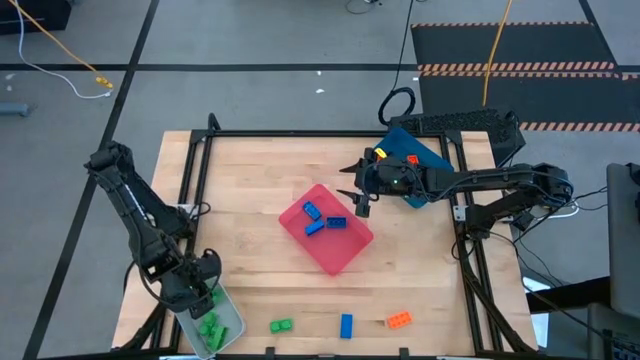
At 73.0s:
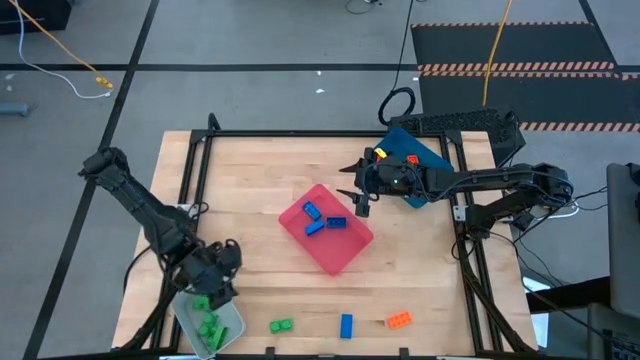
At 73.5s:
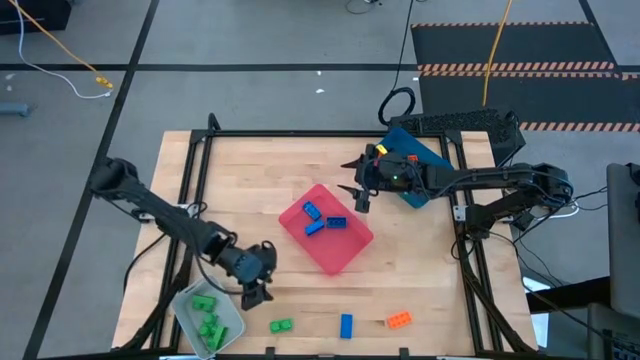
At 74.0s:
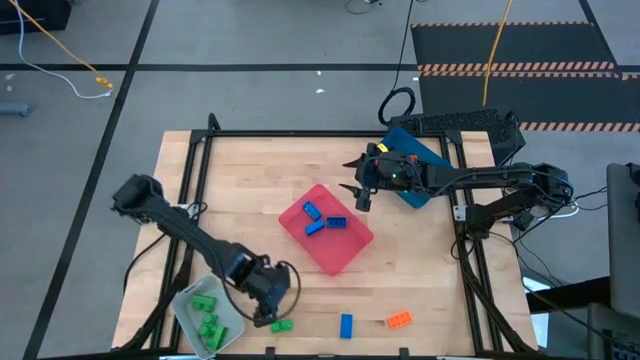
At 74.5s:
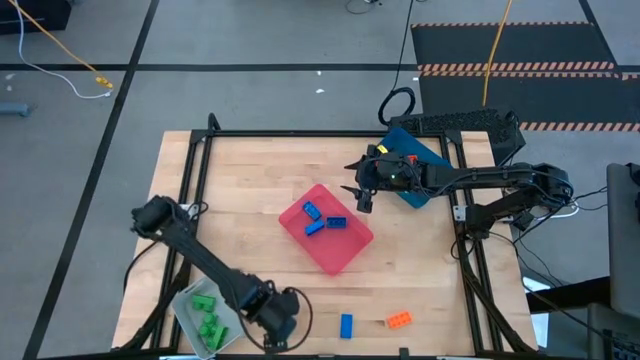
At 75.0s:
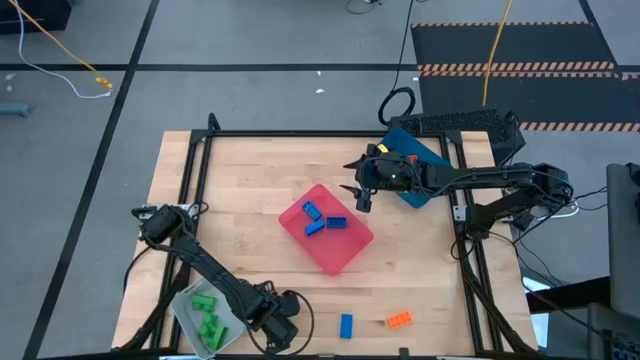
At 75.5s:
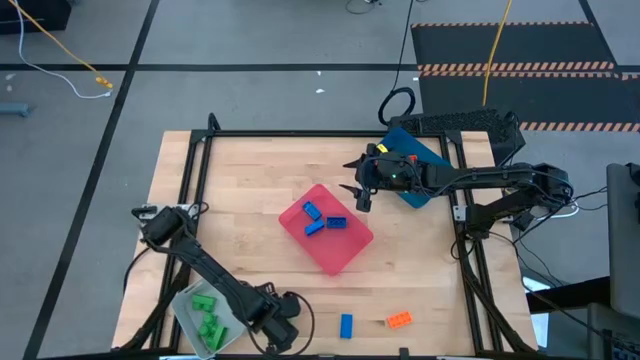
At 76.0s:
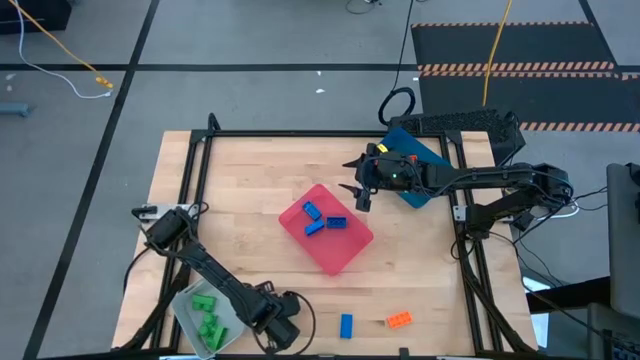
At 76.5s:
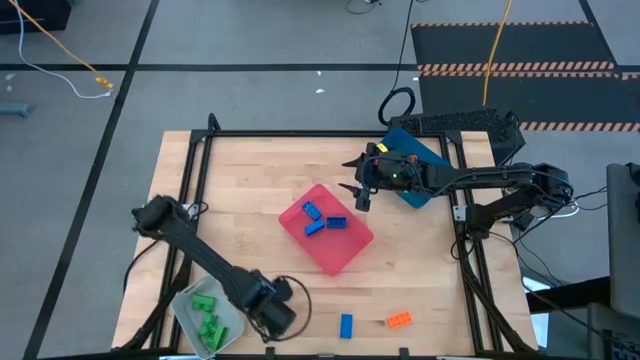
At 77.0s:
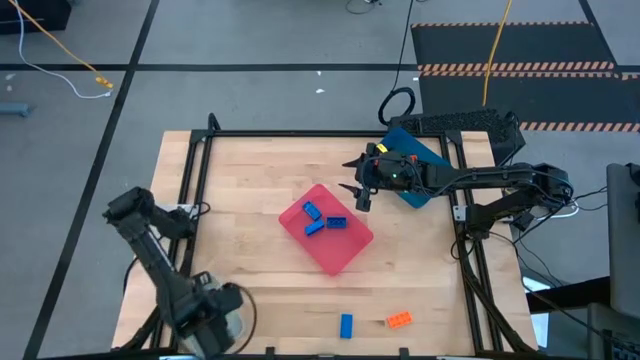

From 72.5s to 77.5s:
Task: Sort & place blocks by color
Put the green game piece into the gray bin

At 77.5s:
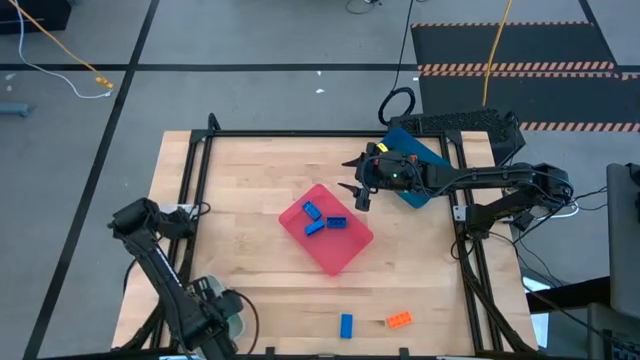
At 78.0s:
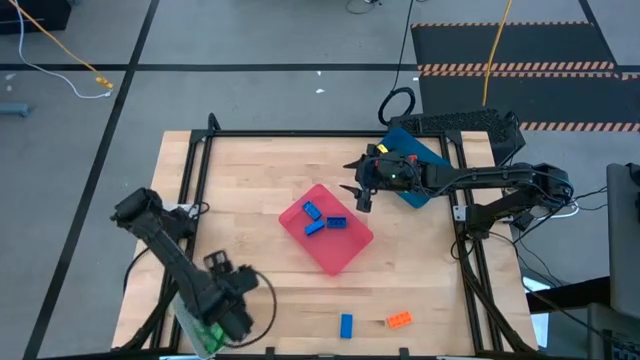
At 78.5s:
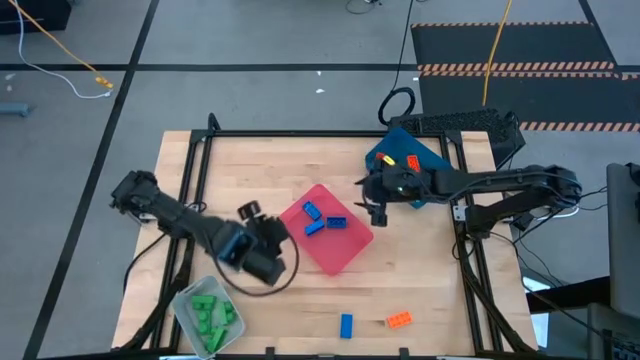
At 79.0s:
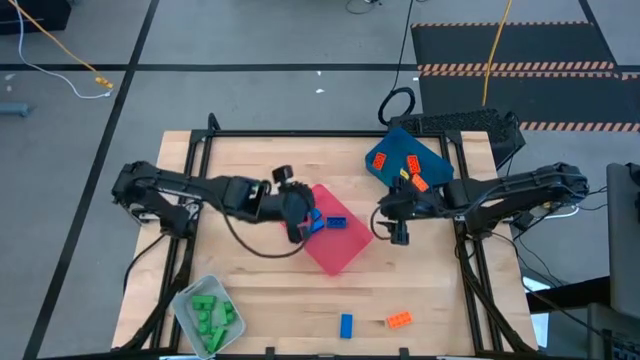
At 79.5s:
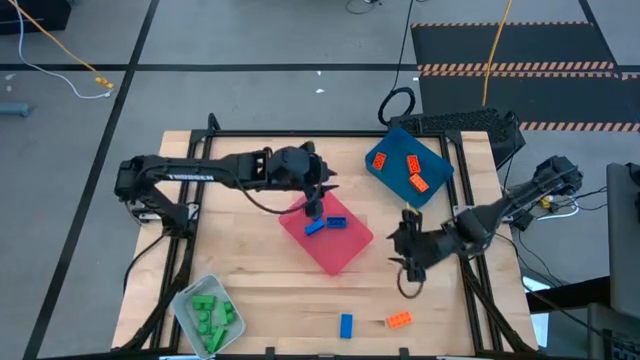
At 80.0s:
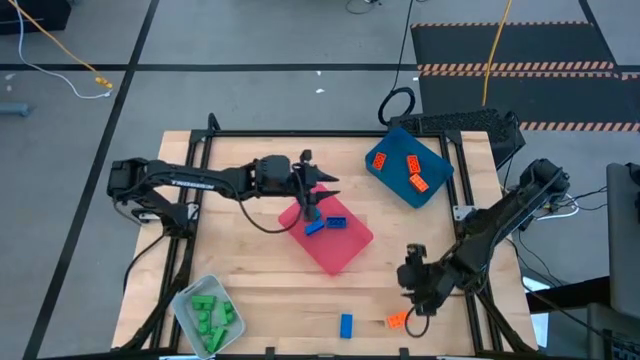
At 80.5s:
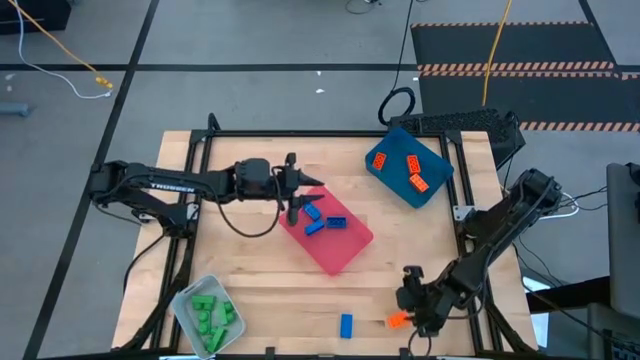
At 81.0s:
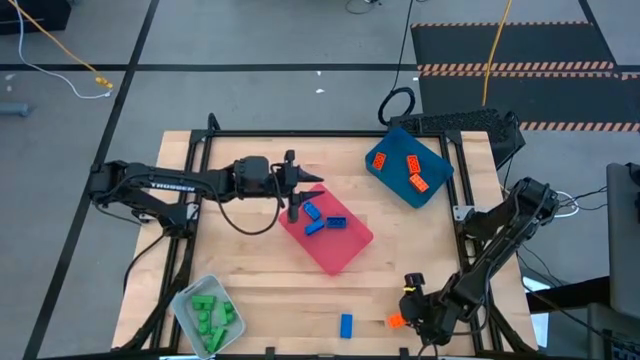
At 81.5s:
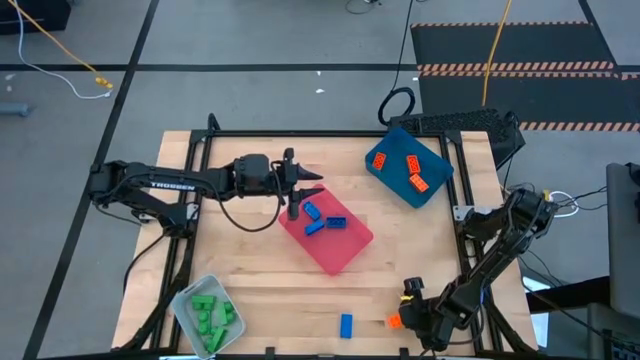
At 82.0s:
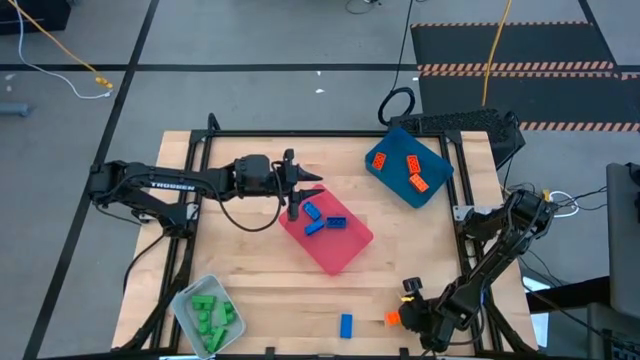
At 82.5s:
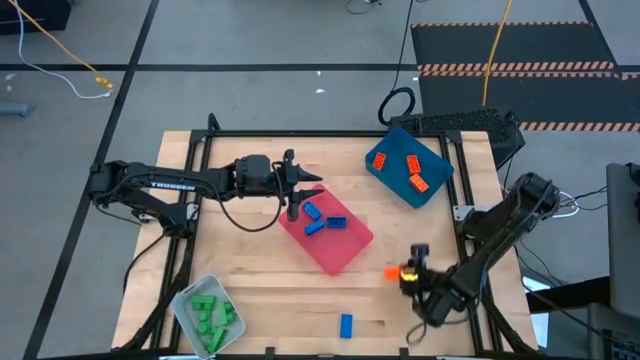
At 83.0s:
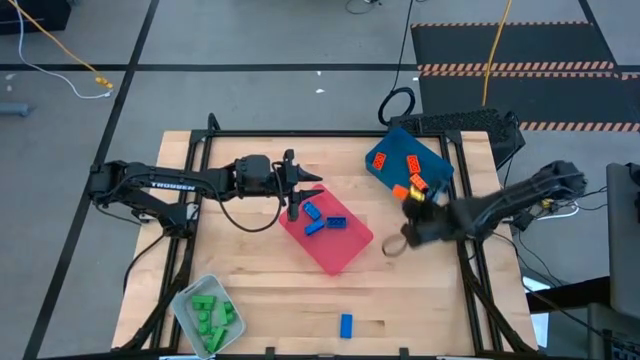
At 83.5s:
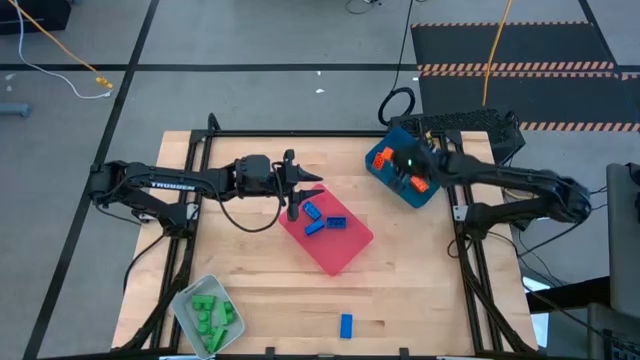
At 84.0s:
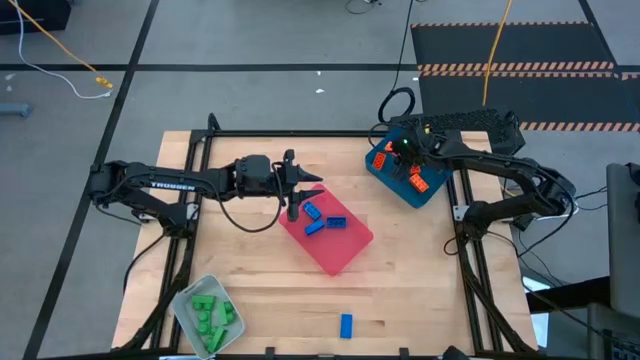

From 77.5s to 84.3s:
Put the orange game piece into the blue bin

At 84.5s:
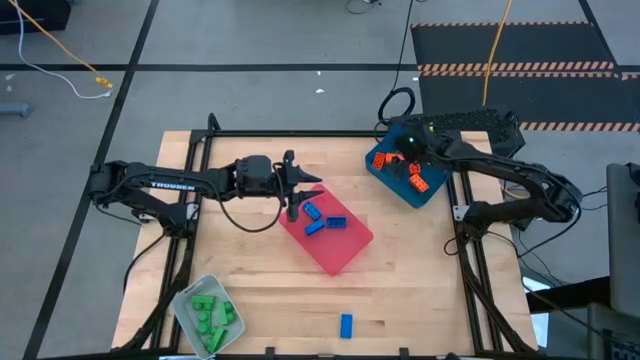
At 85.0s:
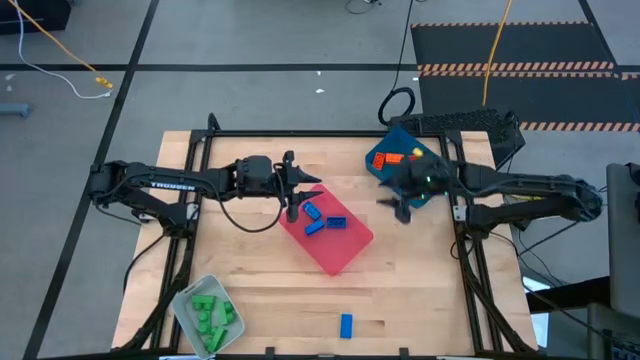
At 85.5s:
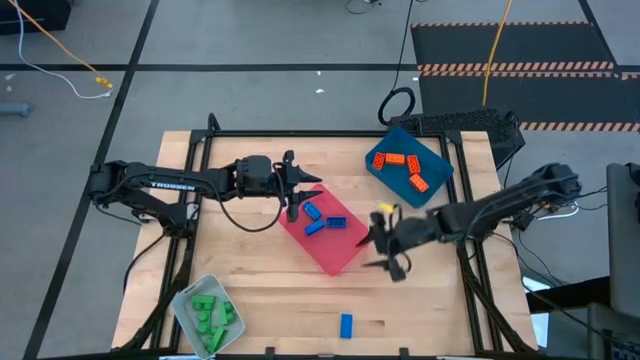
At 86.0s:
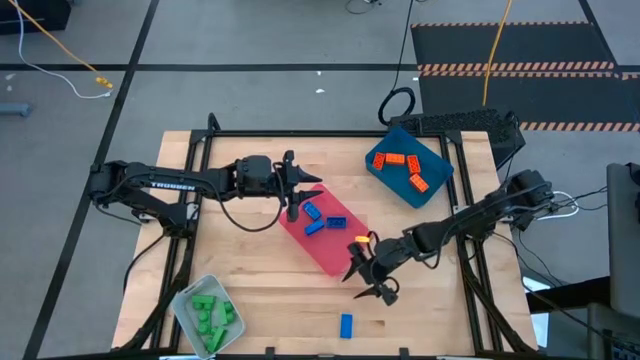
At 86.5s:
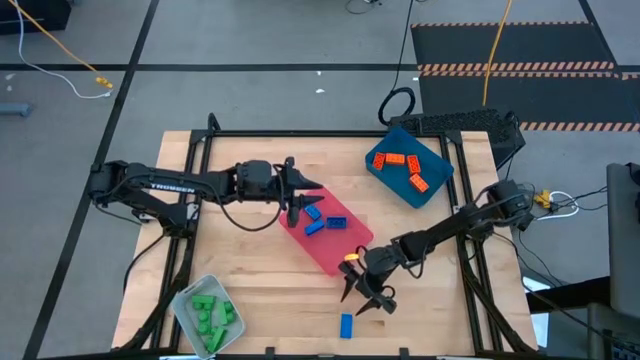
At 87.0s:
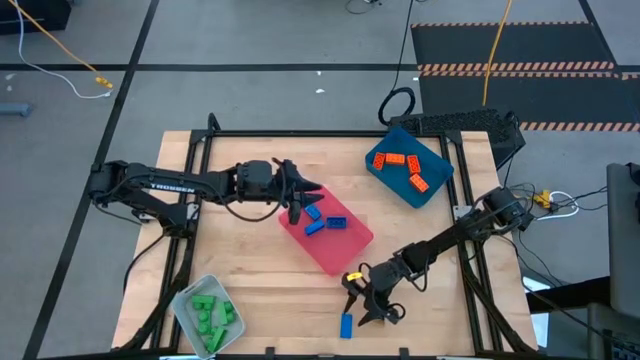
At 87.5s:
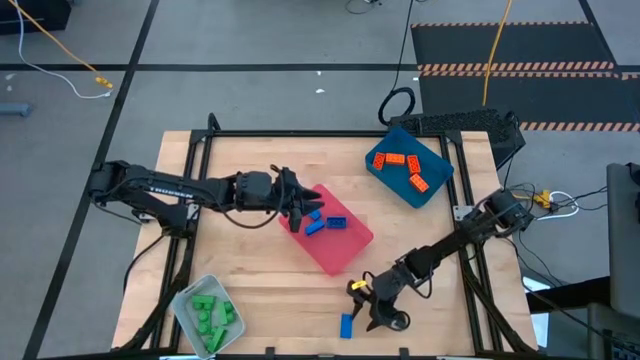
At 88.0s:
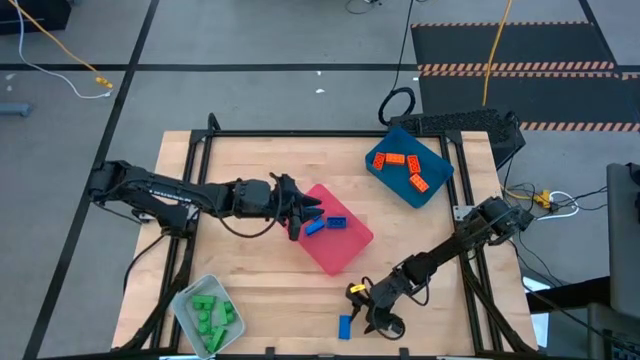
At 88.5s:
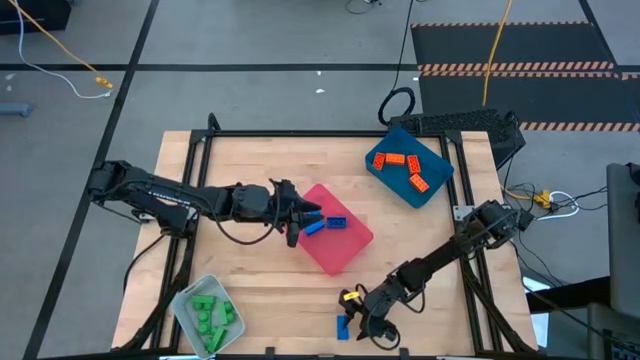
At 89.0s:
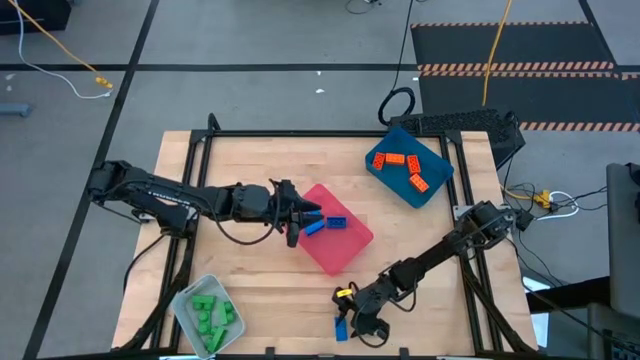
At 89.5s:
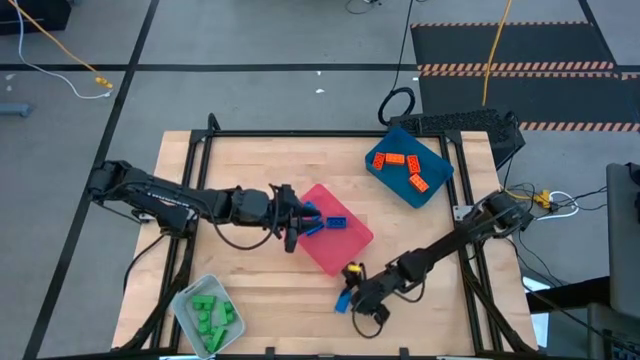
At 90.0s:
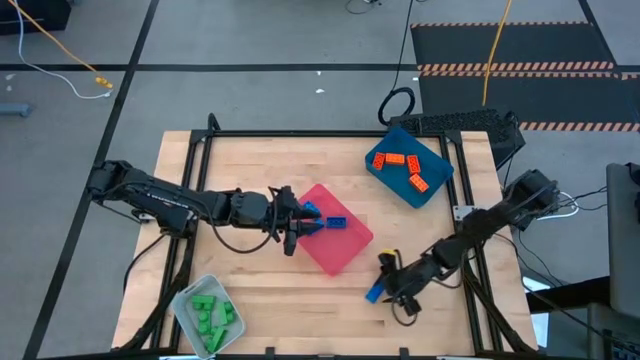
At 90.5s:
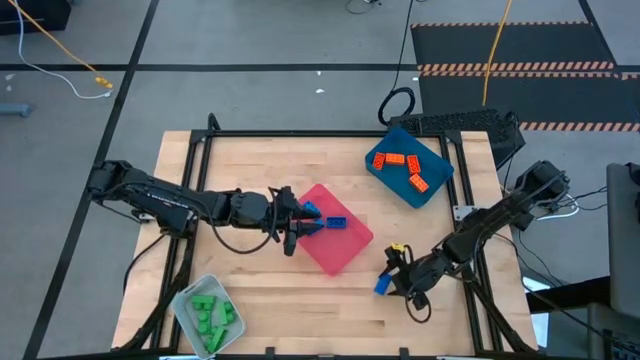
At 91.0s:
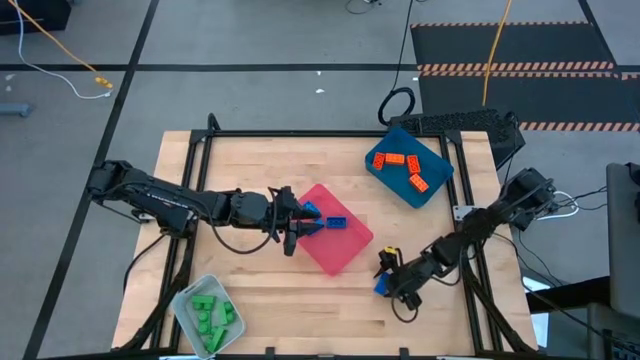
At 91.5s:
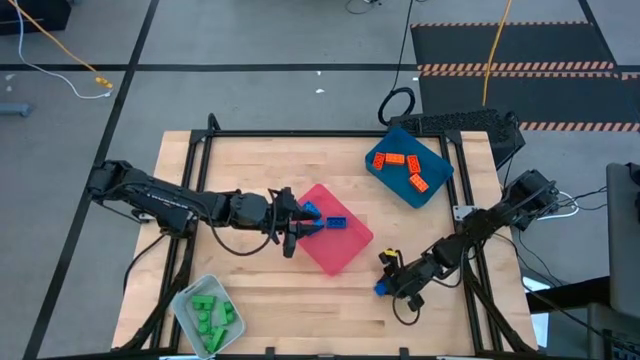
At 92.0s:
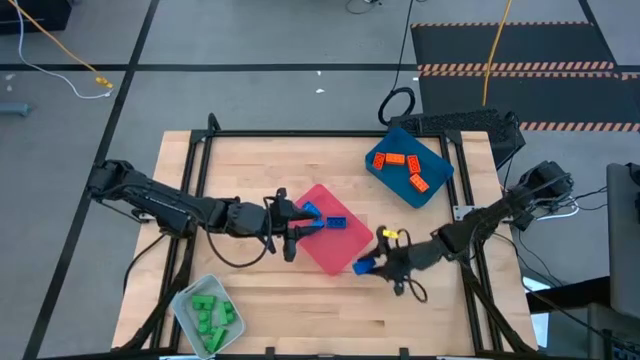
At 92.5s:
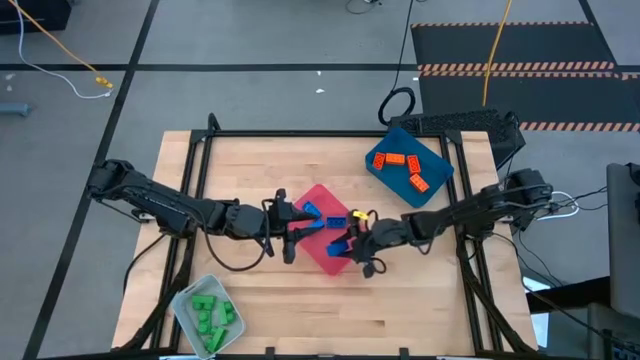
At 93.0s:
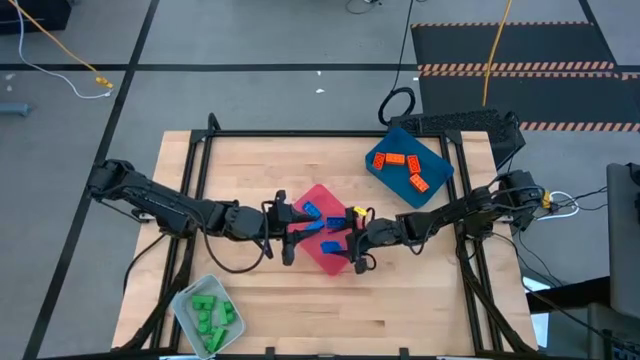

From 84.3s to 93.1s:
Put the blue game piece into the red bin

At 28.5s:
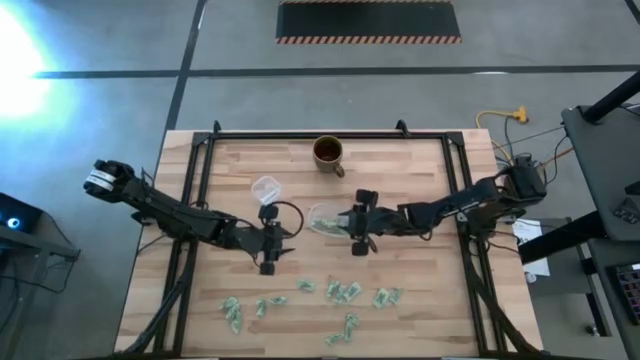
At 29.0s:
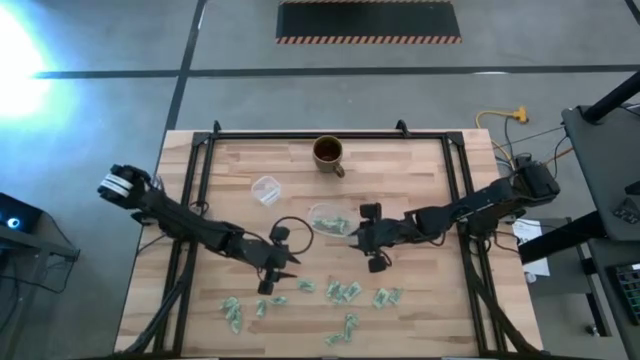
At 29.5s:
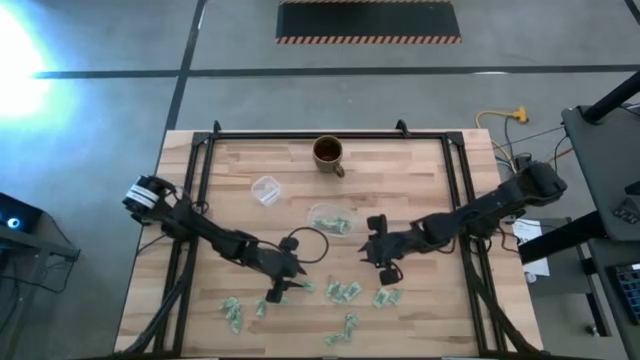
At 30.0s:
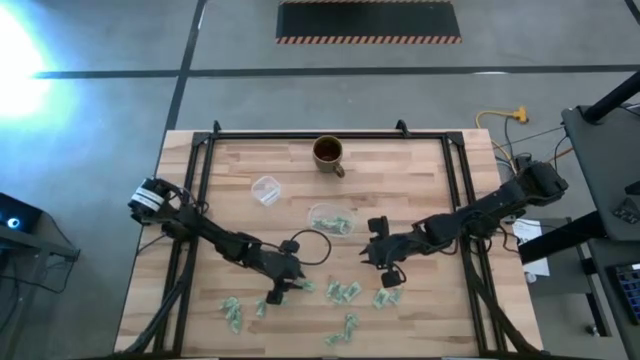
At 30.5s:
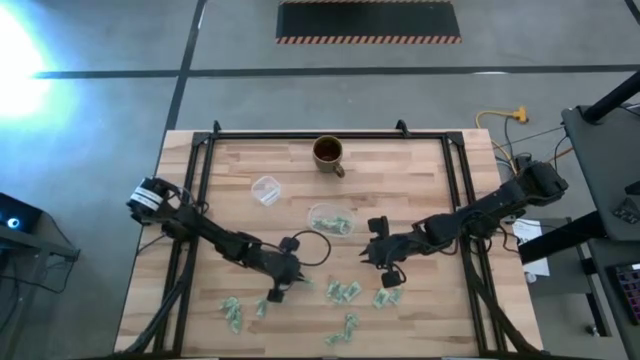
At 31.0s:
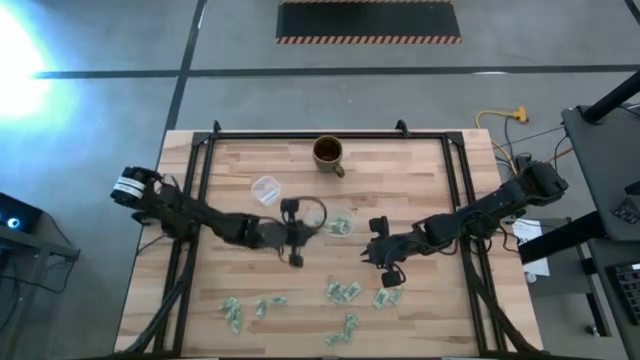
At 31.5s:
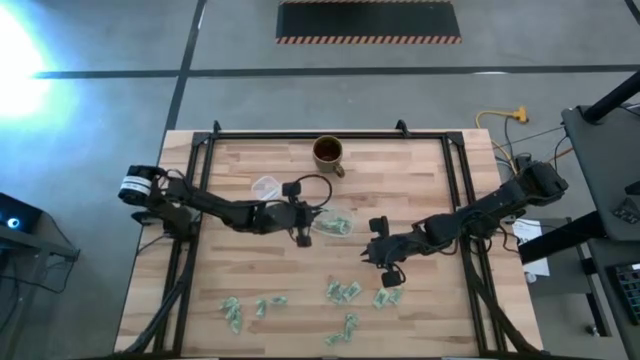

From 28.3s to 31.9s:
Task: Pick and place Stevia / Truvia into bins
Put the green stevia packet into the transparent container
